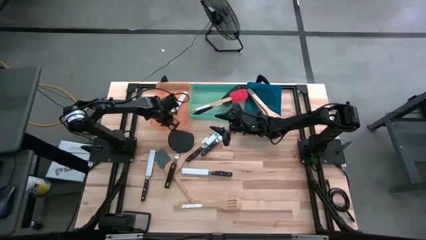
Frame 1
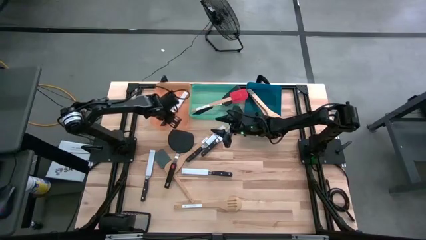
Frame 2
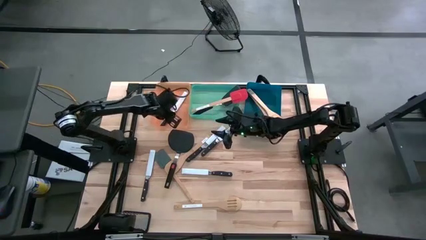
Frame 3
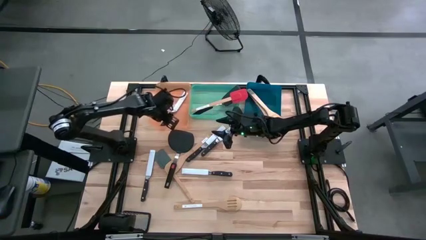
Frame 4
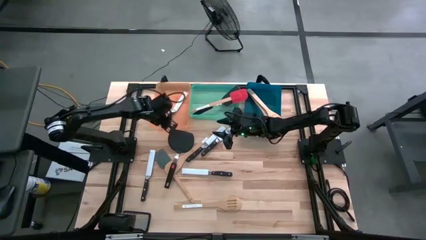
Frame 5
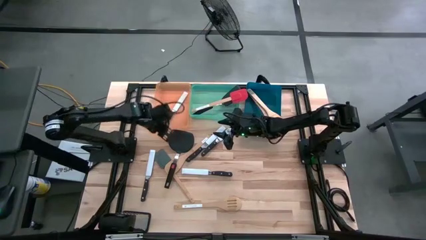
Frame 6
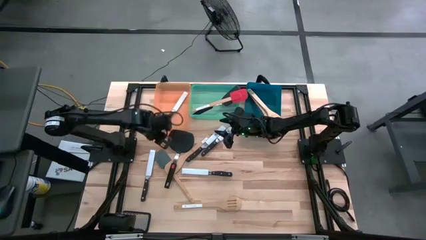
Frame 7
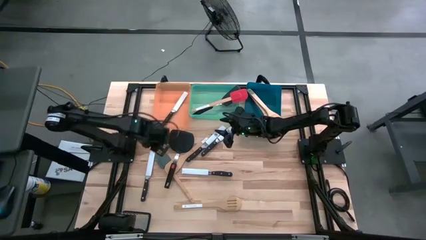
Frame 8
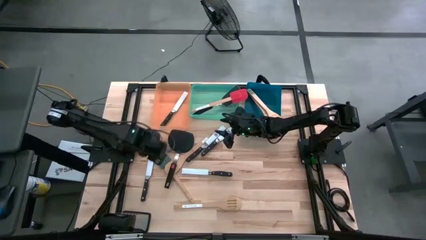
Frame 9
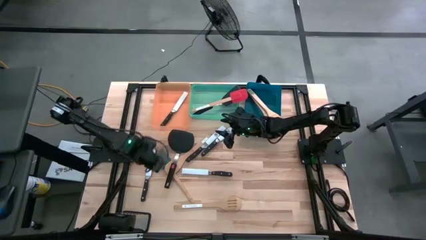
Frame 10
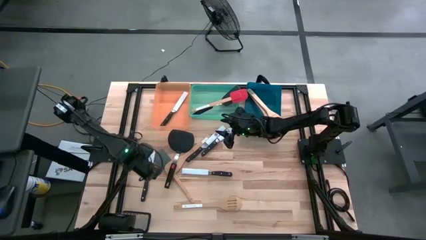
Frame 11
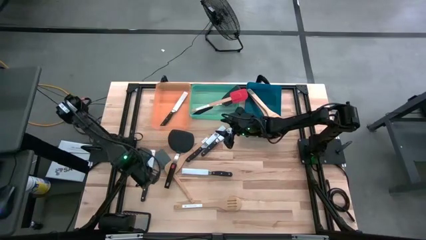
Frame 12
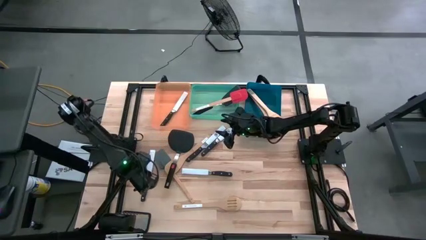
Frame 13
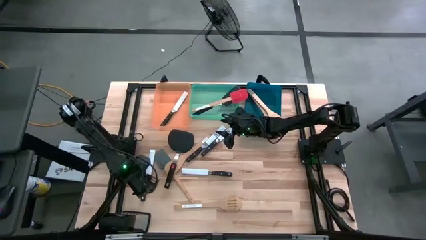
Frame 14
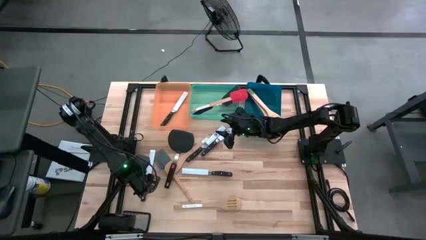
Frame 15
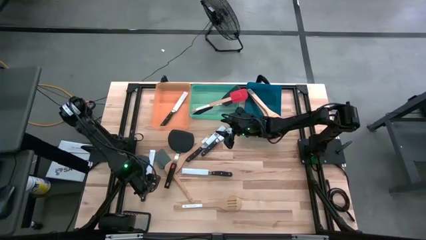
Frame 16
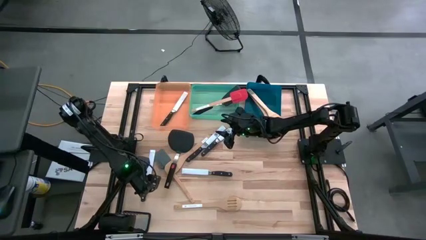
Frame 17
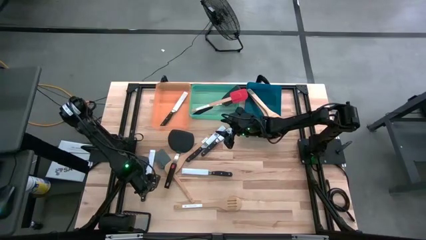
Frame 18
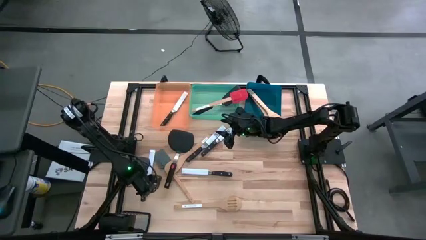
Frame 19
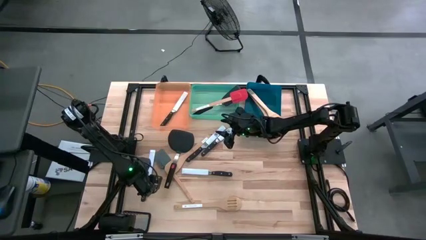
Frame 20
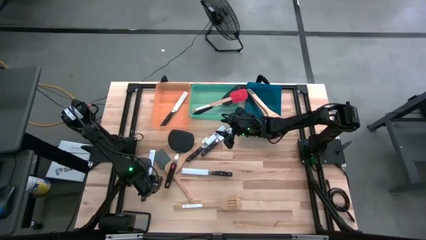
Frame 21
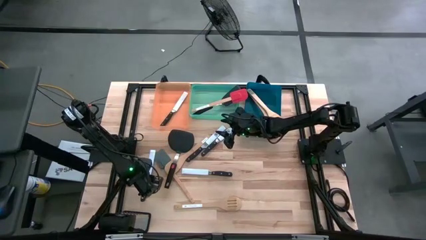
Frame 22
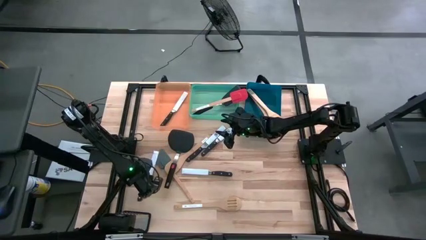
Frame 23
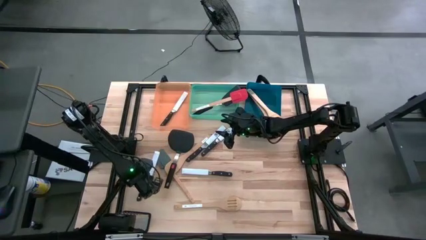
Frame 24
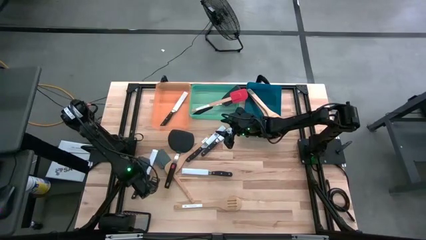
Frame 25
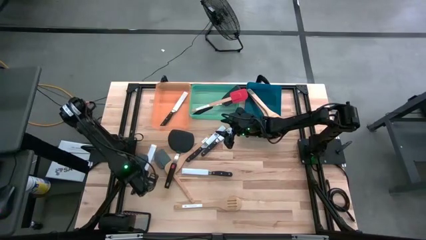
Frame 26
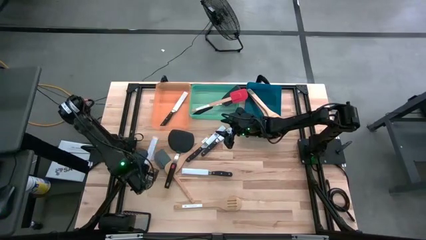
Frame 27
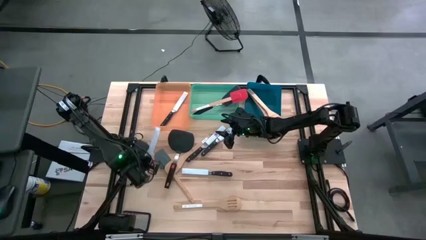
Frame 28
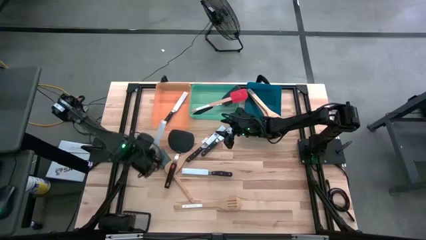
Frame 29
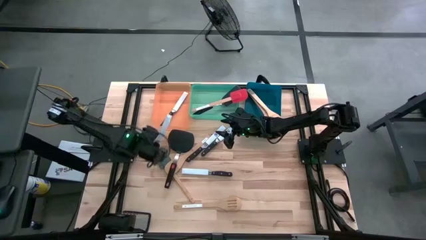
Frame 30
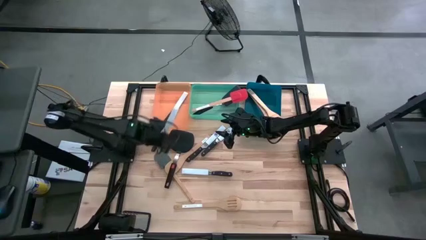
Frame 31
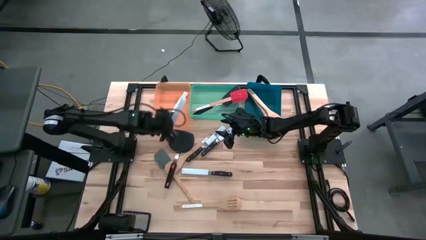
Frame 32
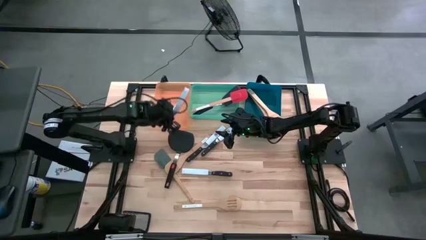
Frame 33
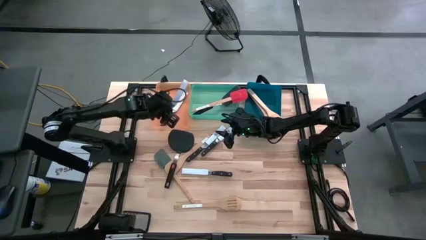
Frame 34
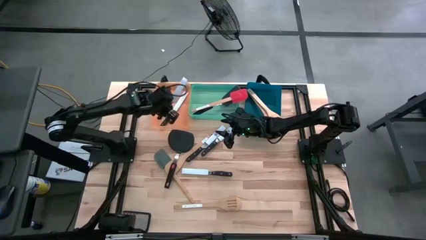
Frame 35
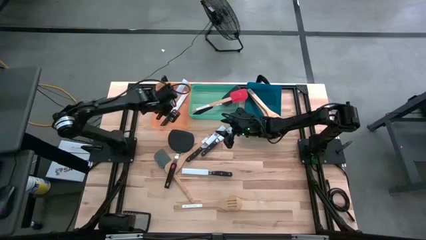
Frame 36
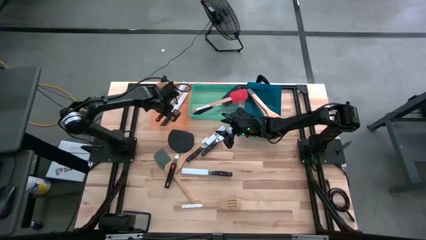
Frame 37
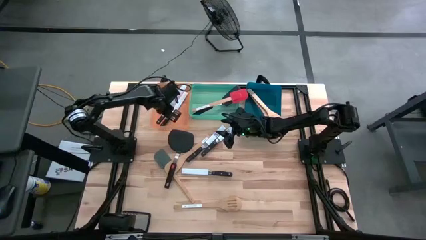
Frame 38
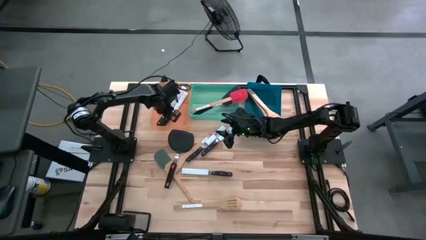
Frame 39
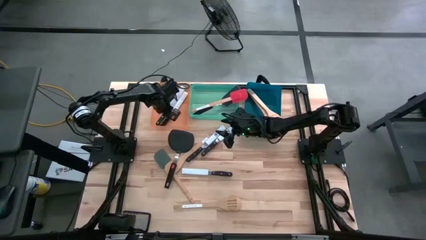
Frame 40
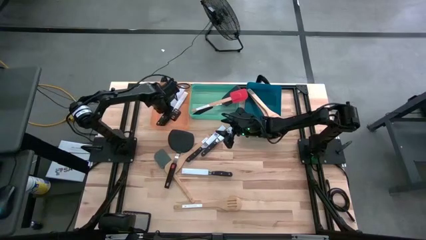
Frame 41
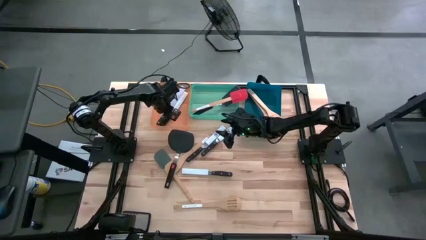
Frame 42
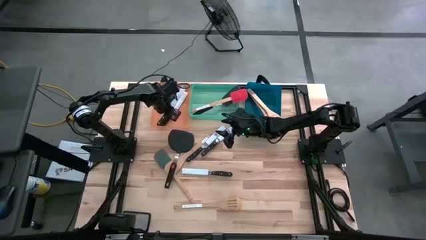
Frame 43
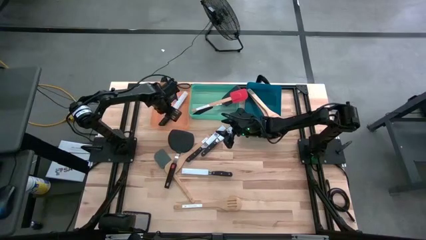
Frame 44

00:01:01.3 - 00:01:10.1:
Task: Pick & Place Kitchen Items
Put the black knife into the orange bin

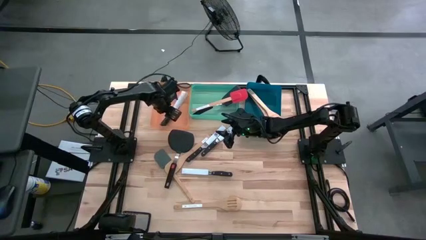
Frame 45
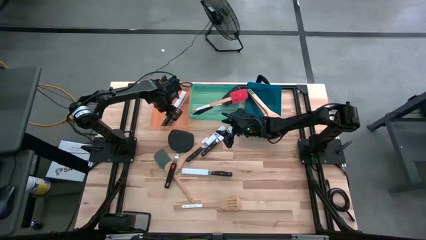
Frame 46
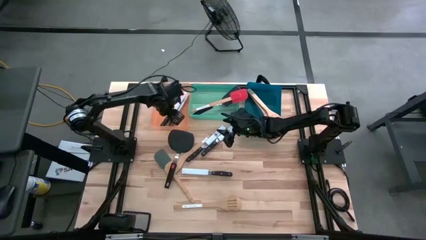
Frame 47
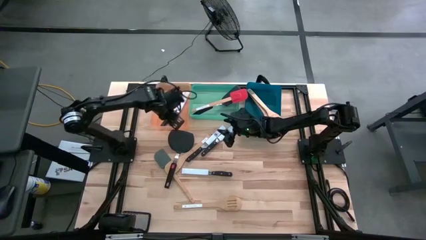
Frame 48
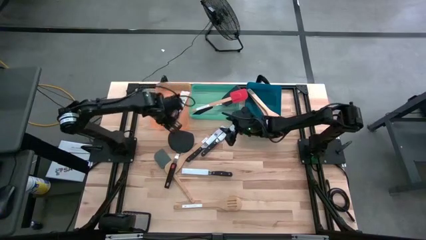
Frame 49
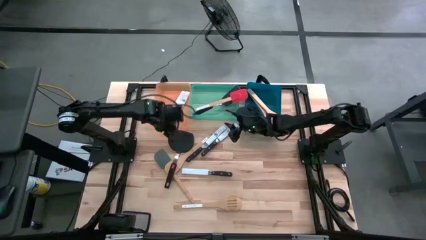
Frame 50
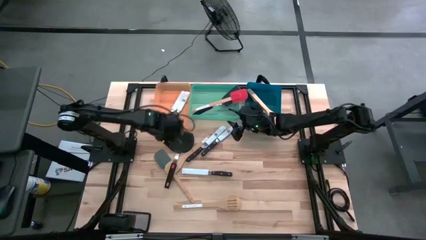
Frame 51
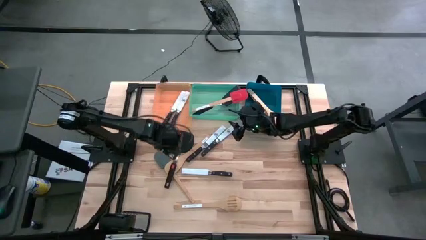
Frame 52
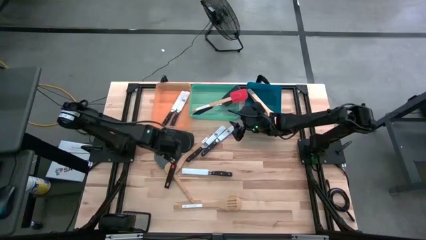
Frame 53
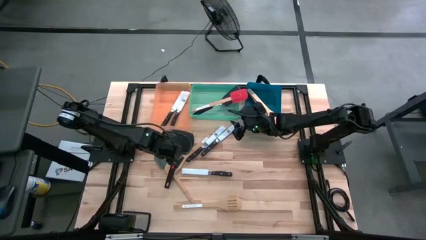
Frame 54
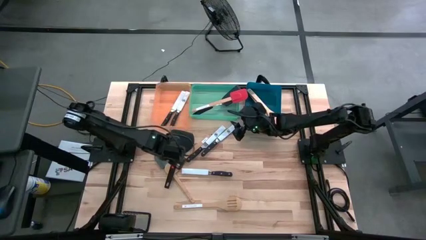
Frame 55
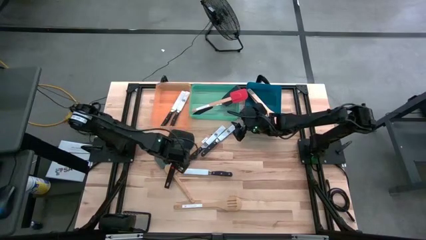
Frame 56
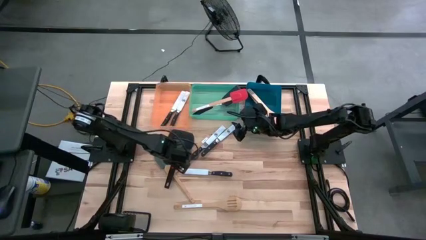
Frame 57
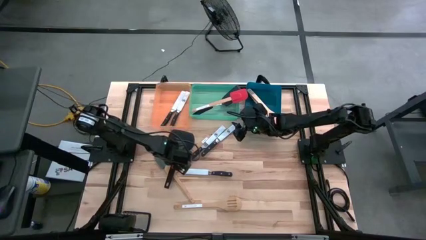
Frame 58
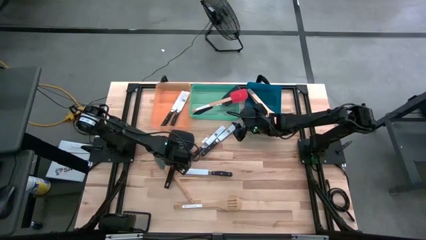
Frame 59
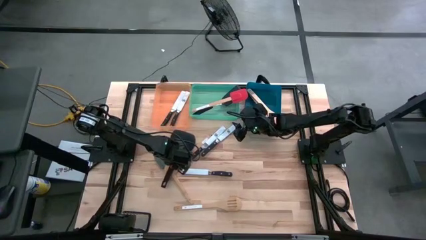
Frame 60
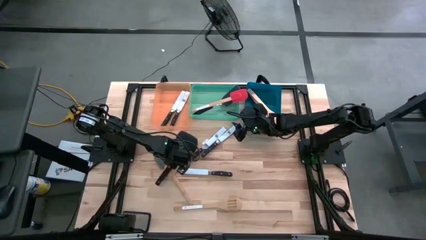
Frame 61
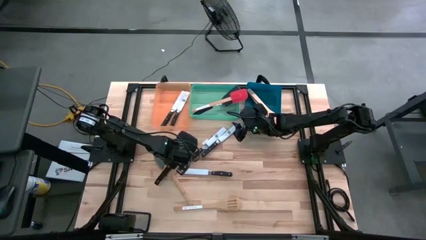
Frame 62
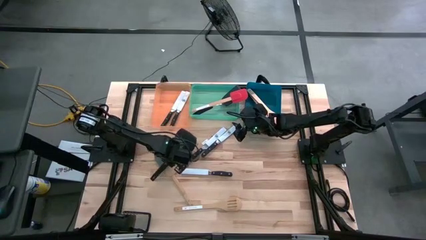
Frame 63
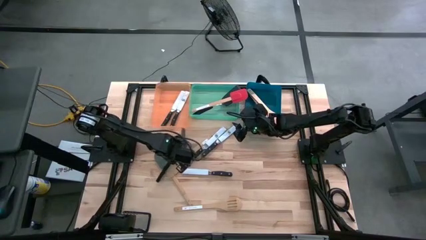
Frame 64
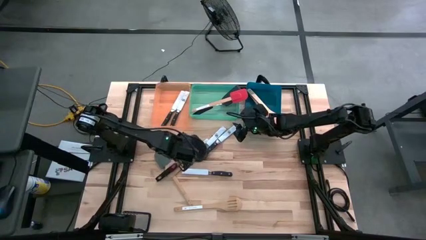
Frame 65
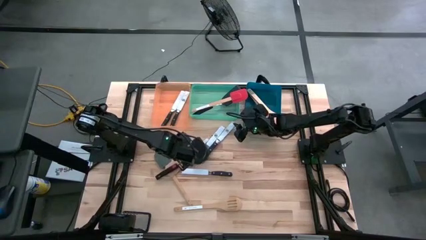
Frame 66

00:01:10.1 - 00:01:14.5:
Put the black spatula into the green bin

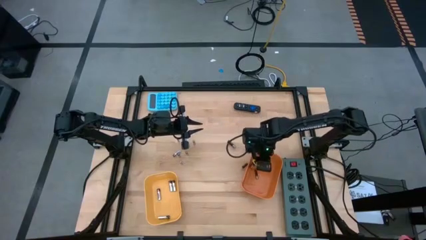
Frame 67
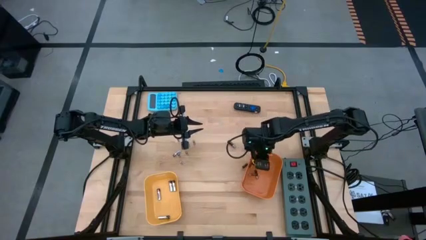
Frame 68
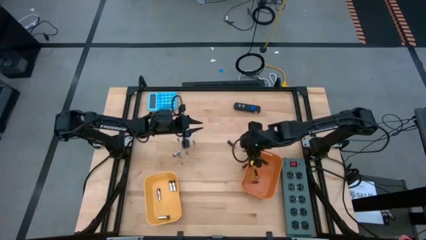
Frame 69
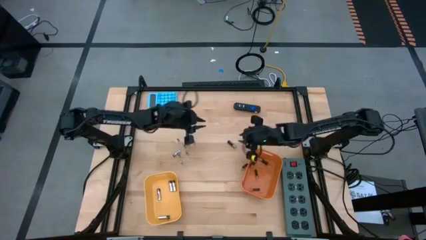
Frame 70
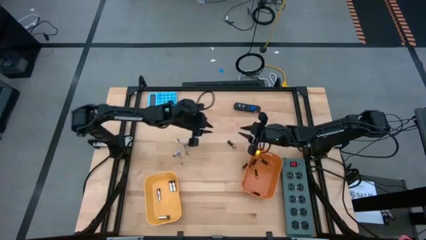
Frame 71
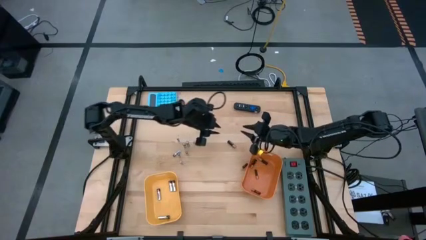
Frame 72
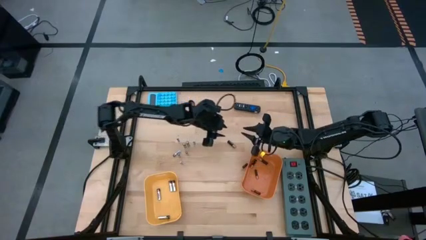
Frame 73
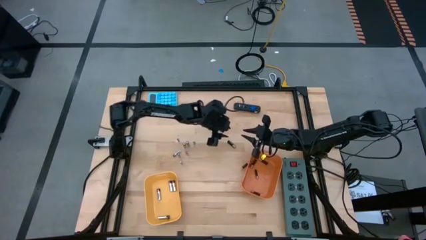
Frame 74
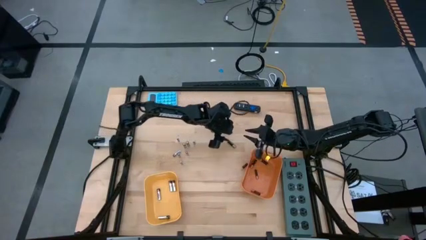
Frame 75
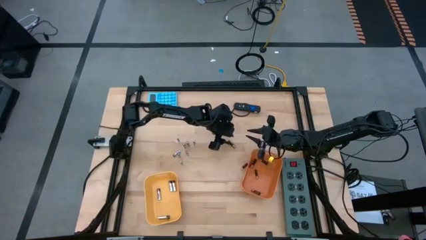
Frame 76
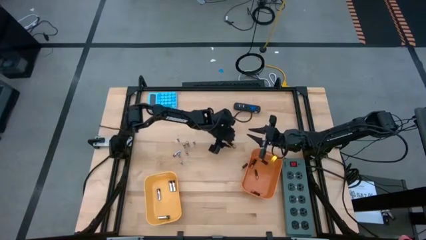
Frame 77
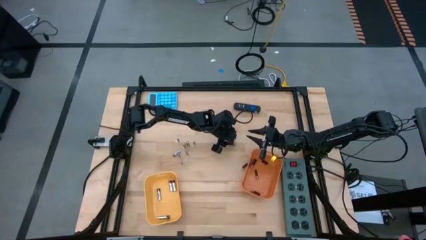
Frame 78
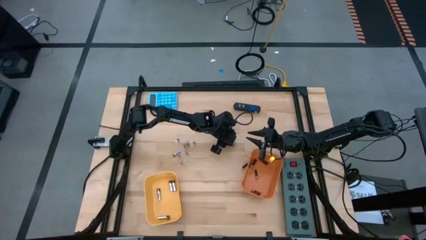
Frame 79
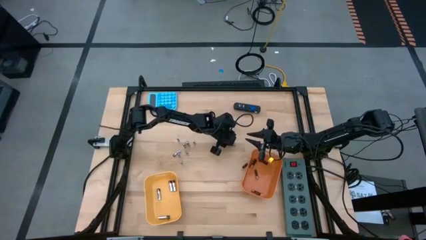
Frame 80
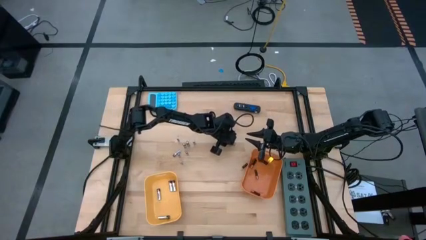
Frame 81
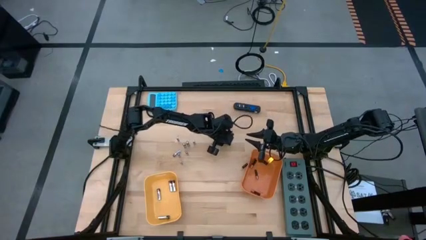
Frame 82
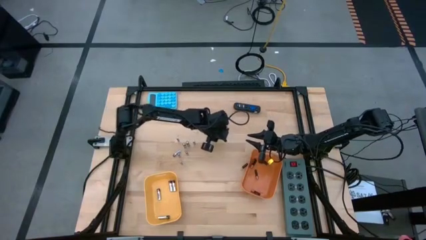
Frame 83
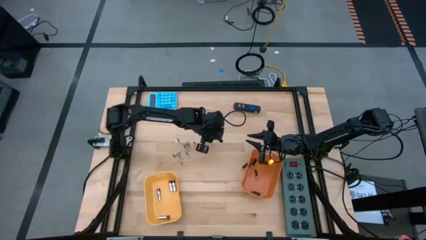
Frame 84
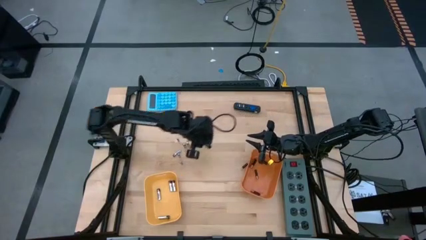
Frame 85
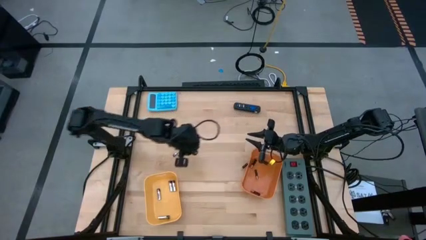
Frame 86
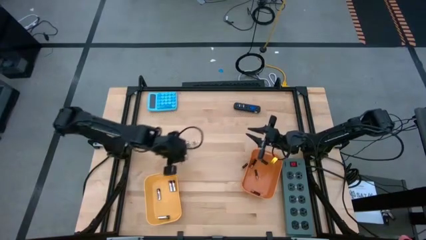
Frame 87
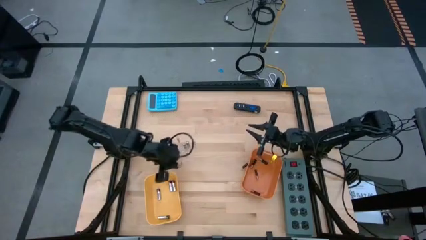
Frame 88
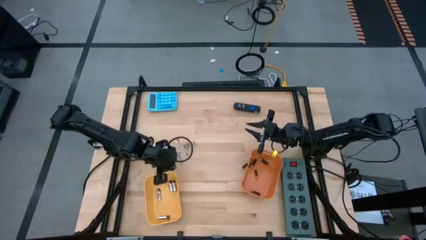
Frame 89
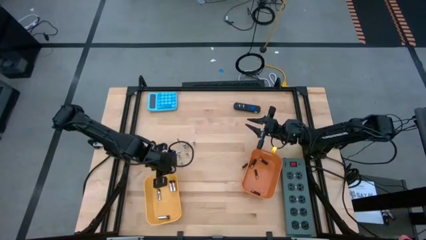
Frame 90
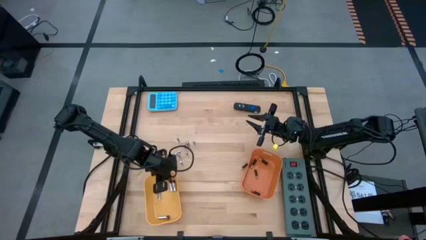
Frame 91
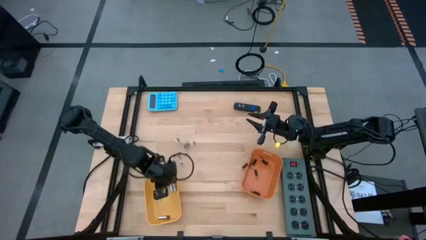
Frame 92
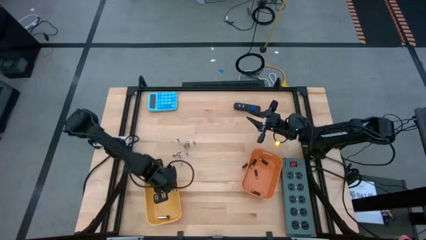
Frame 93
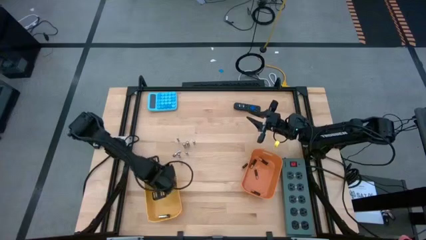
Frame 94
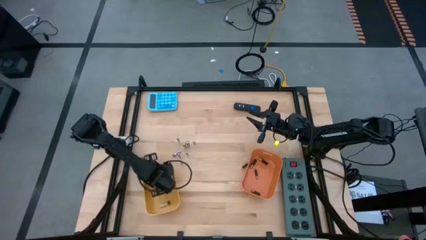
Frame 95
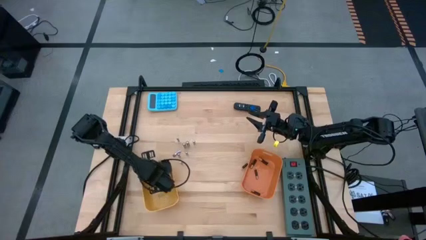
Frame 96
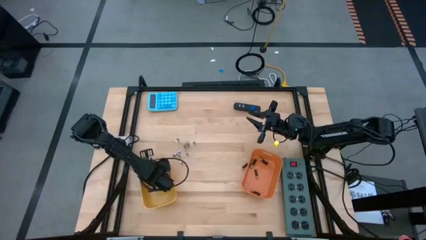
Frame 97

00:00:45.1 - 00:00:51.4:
Task: Sort batteries
Put the brown battery into the orange bin
